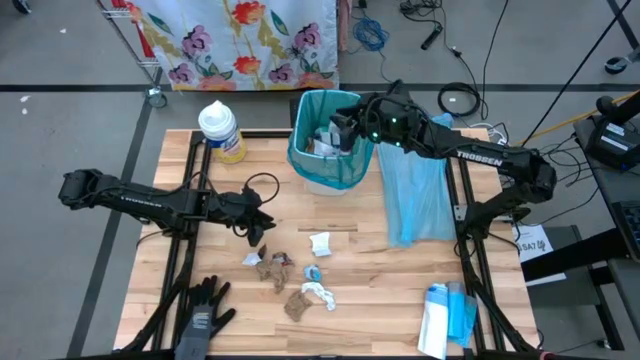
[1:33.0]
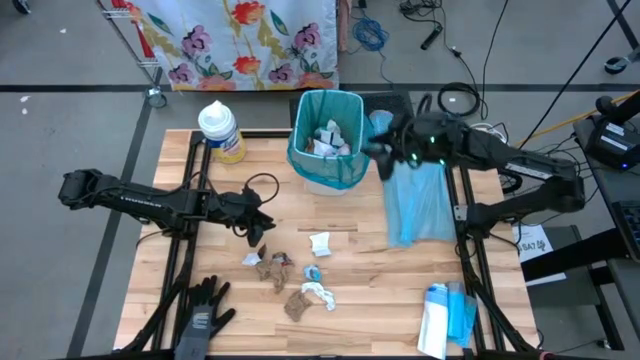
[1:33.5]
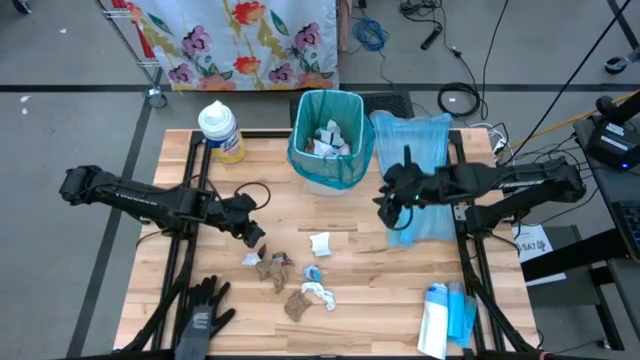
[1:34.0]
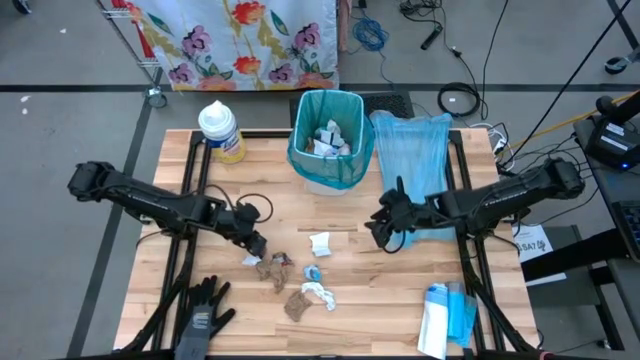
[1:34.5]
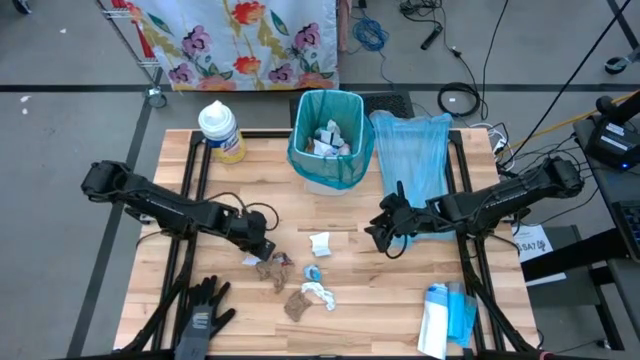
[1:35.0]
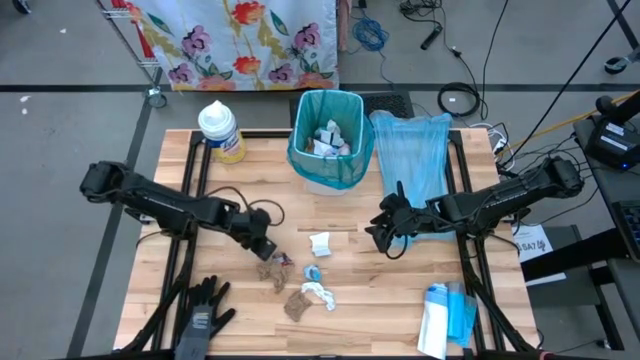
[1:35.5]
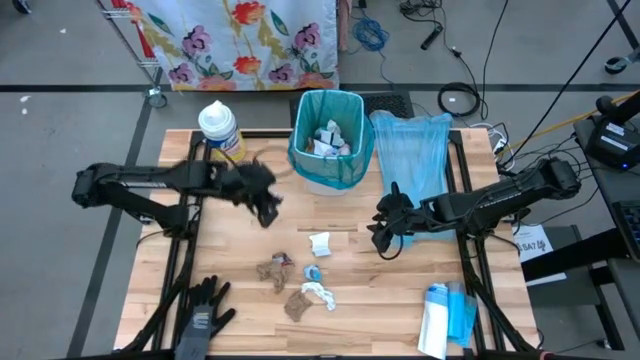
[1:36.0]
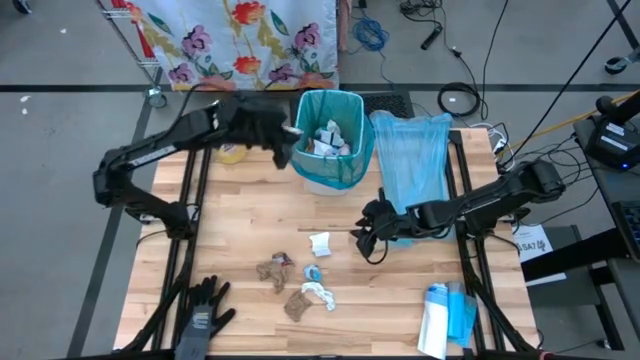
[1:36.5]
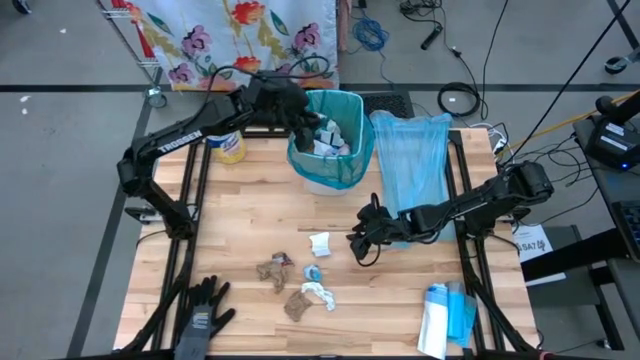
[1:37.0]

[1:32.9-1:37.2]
Task: place trash/remove bag and relplace
Put the left white paper piece into the trash bin

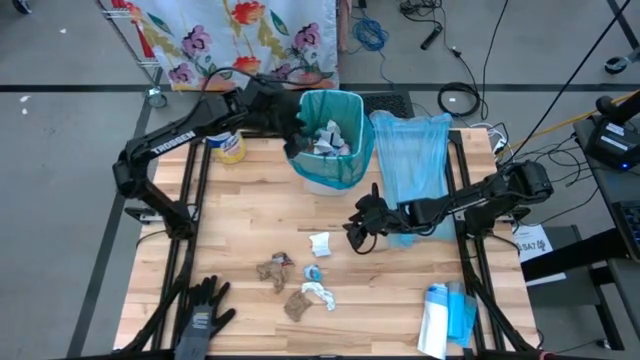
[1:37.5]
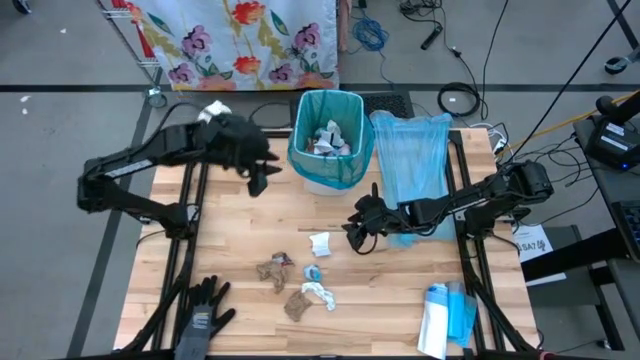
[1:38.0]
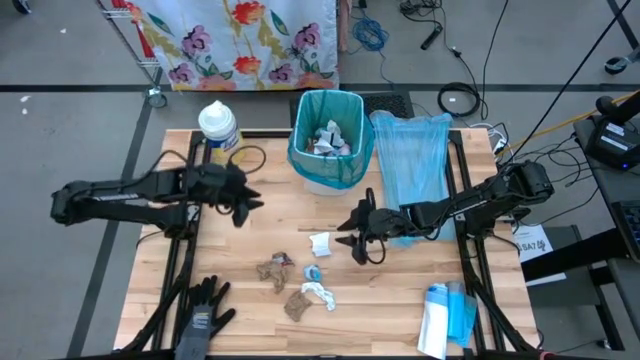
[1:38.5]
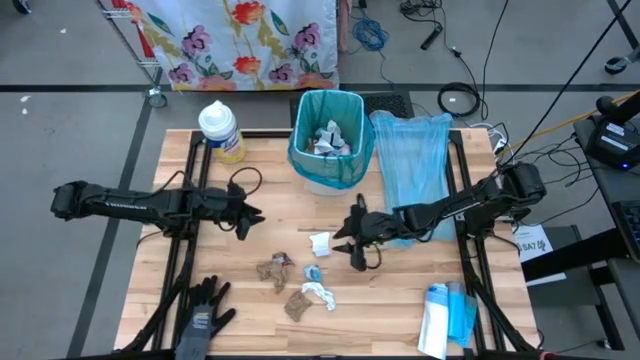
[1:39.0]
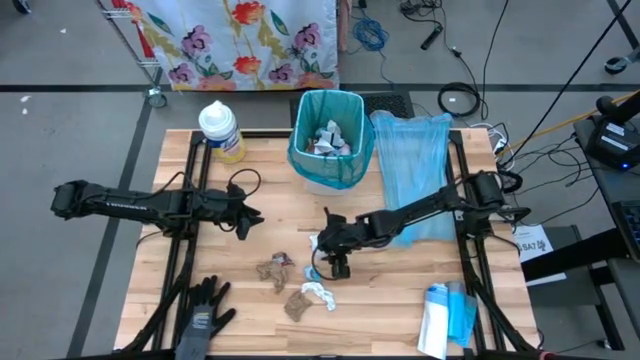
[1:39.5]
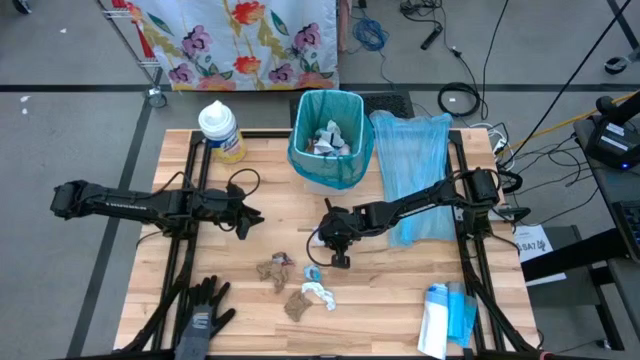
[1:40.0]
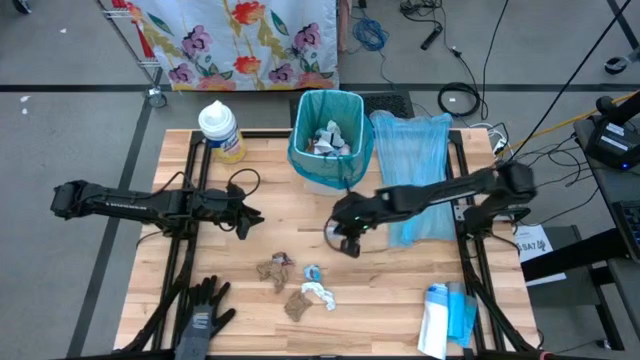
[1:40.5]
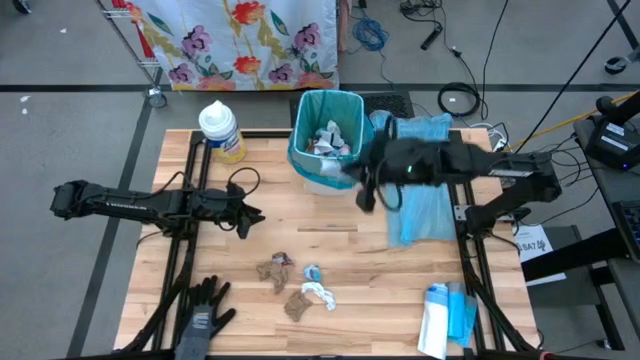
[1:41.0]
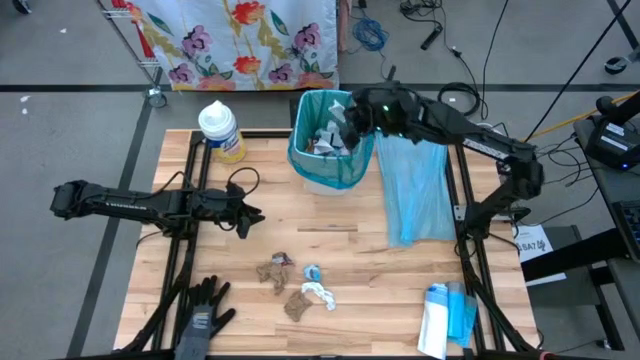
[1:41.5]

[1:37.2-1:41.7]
Put the white paper piece into the trash bin

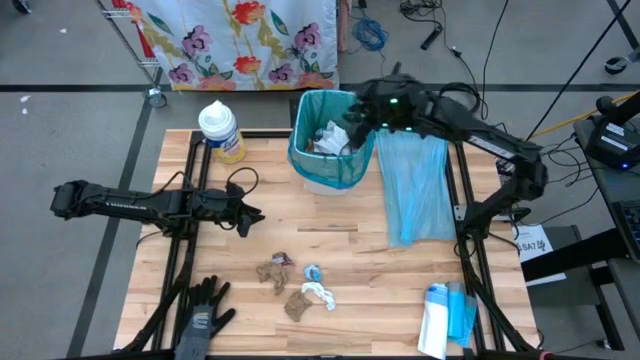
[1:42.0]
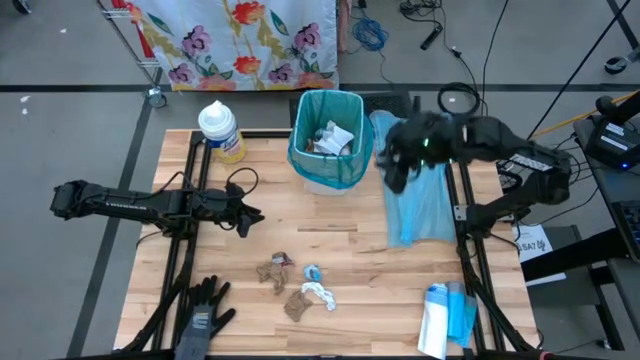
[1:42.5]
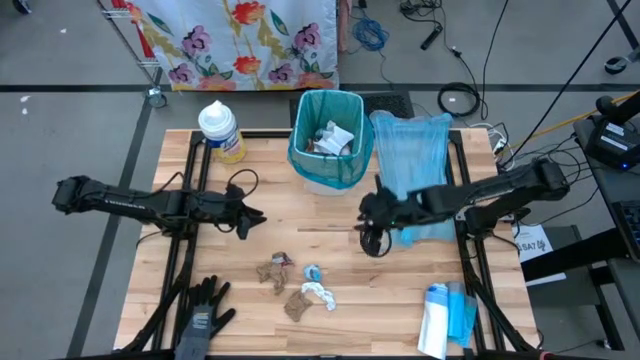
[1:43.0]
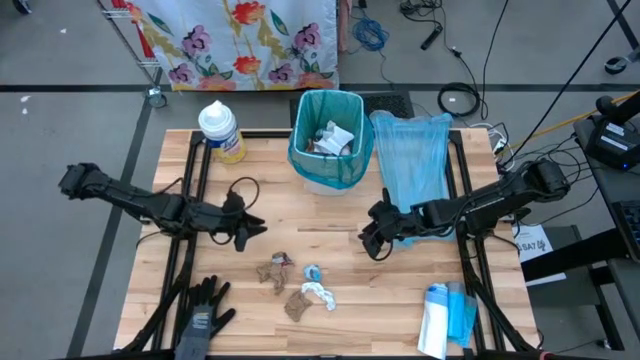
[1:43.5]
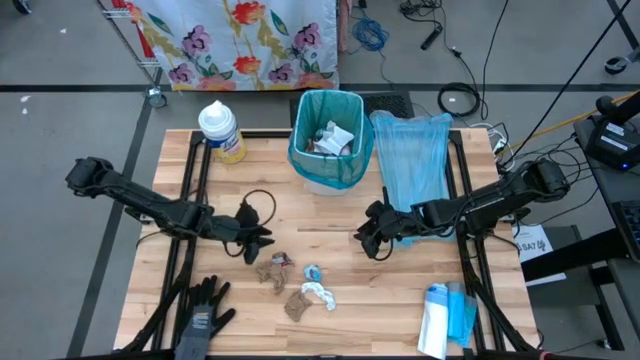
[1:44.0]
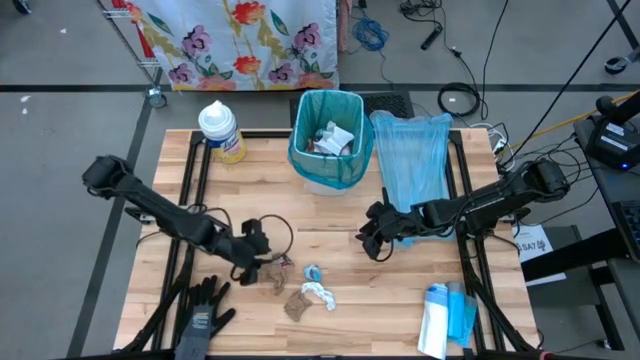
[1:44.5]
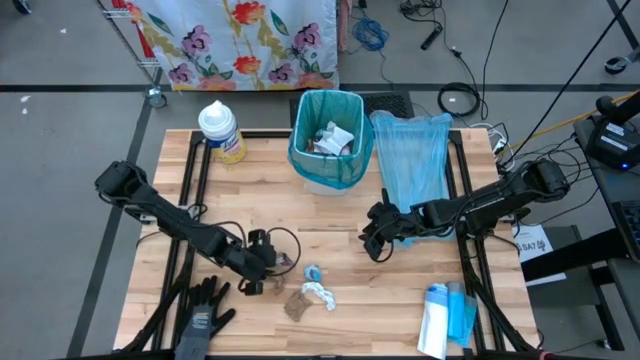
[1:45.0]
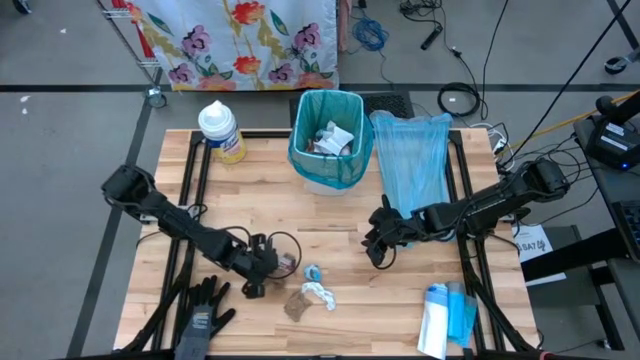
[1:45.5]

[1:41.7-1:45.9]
Put the top brown napkin into the trash bin

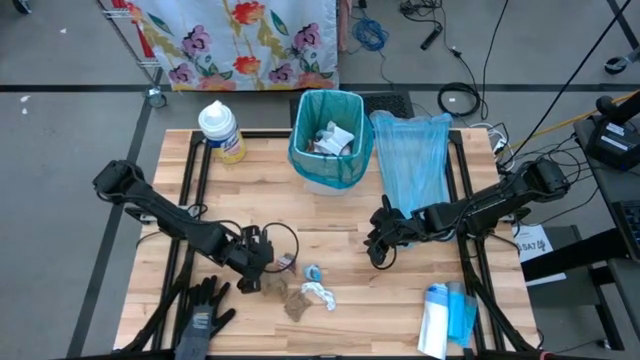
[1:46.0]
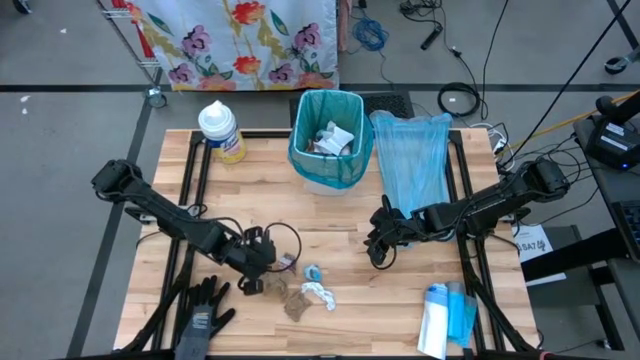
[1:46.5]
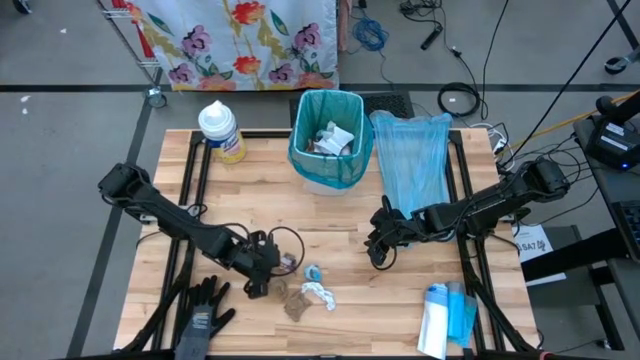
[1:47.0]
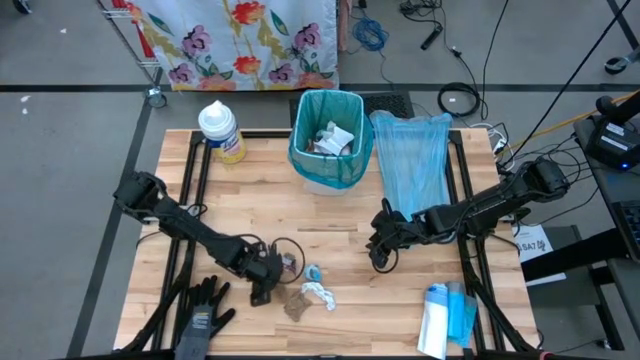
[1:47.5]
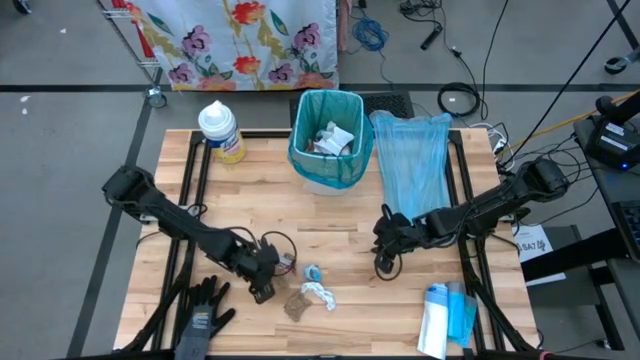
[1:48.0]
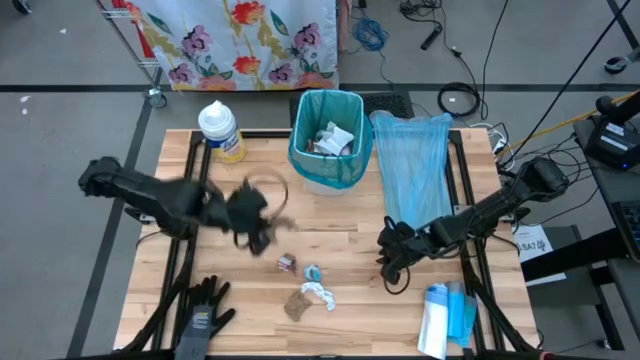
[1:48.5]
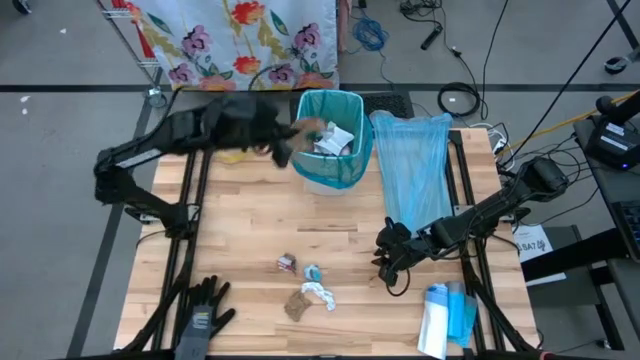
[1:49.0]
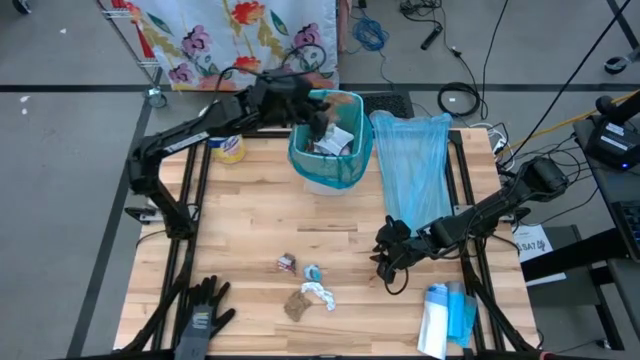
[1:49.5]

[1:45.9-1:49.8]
Put the top brown napkin into the trash bin

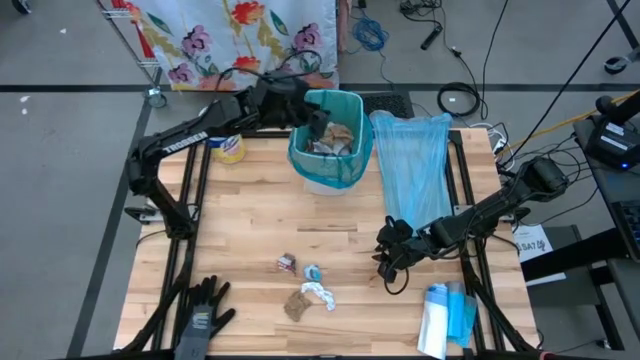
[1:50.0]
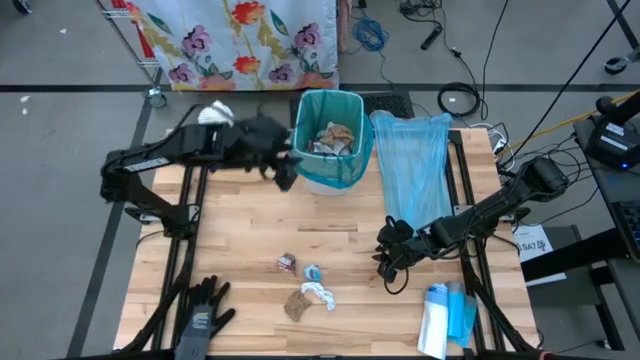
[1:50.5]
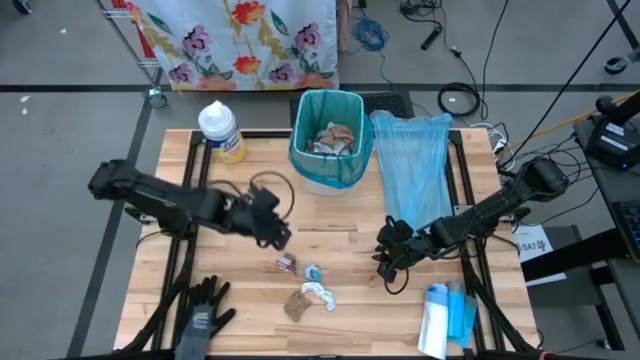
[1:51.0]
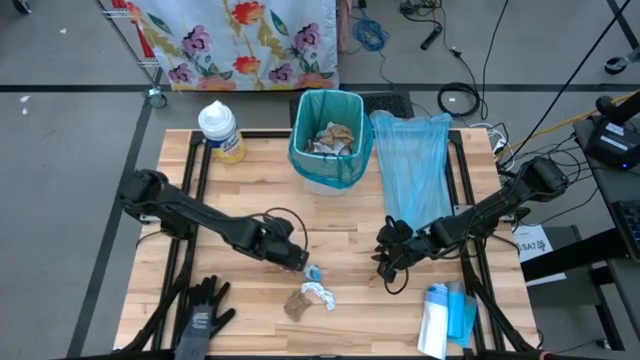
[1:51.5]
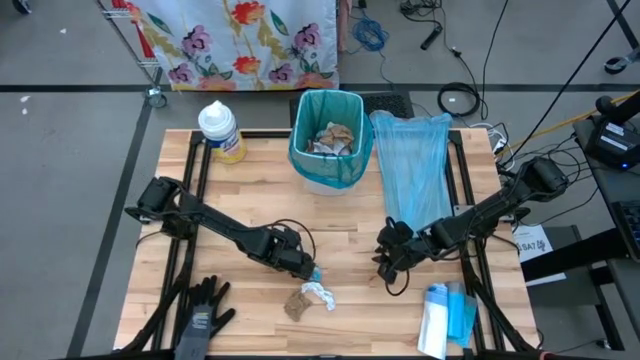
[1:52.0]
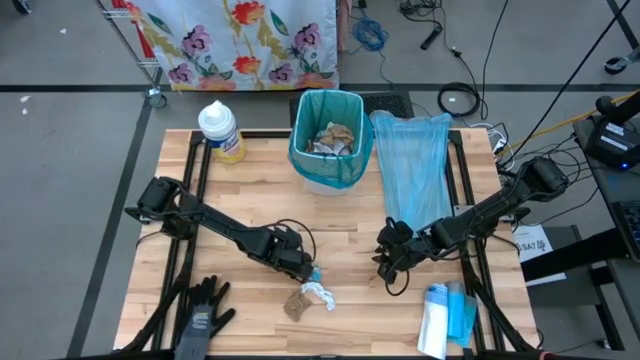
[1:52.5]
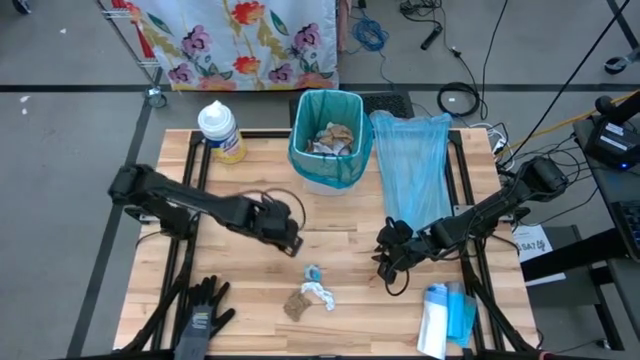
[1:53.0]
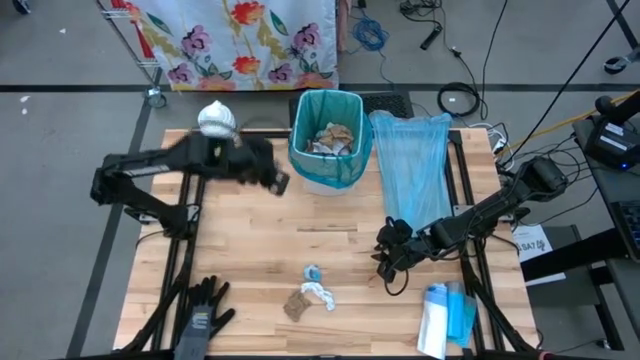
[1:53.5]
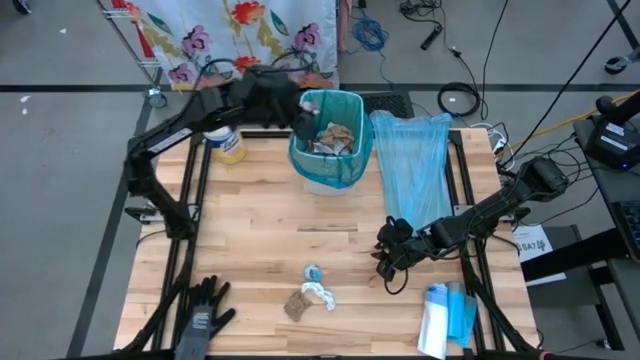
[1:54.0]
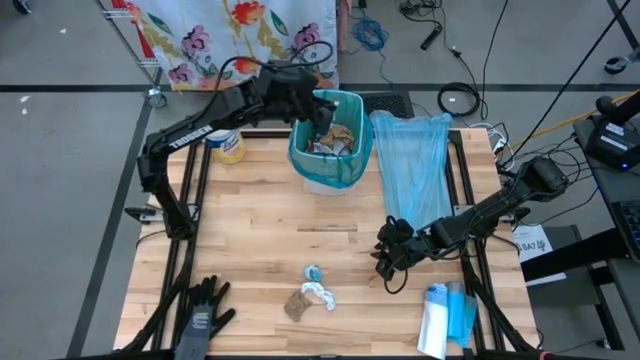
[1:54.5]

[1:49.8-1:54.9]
Put the red black paper piece into the trash bin
